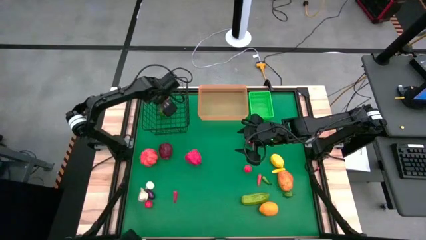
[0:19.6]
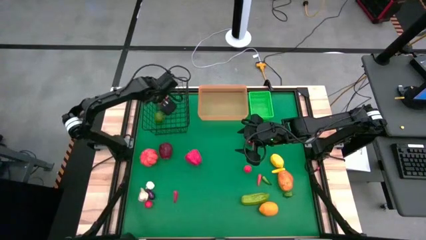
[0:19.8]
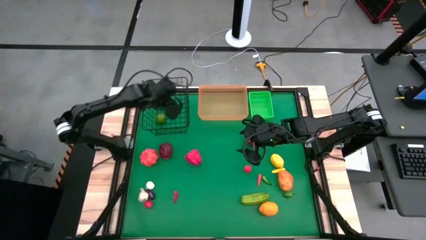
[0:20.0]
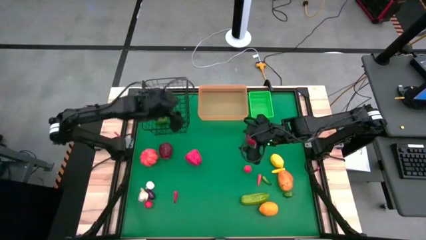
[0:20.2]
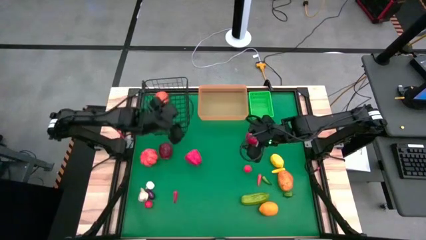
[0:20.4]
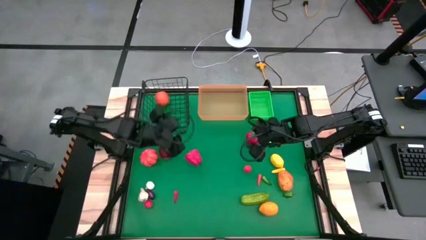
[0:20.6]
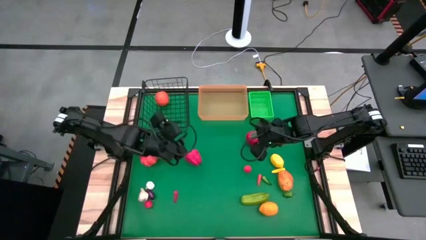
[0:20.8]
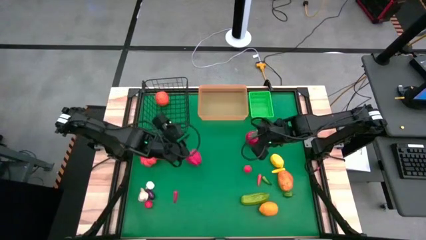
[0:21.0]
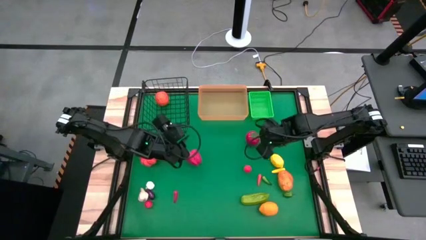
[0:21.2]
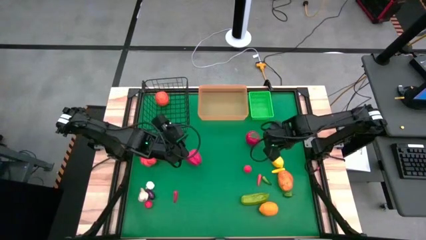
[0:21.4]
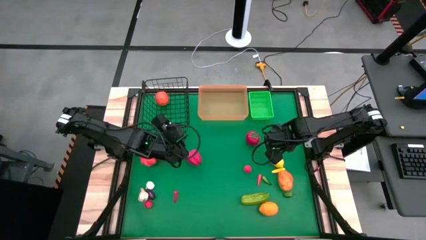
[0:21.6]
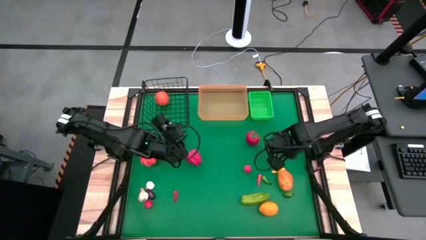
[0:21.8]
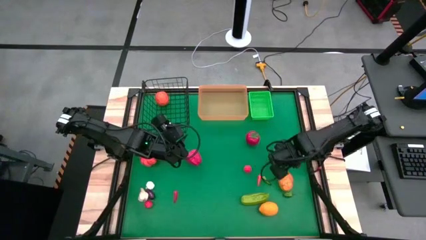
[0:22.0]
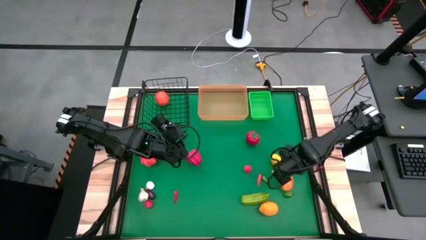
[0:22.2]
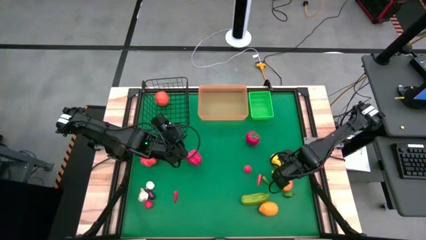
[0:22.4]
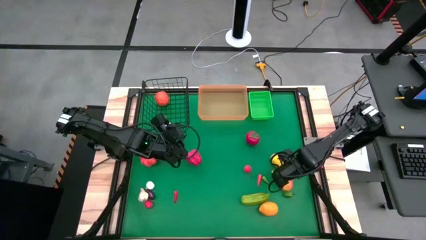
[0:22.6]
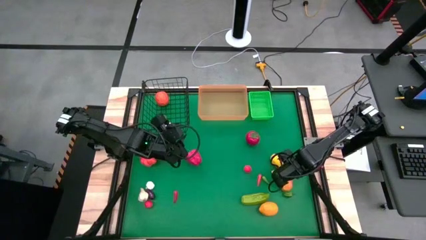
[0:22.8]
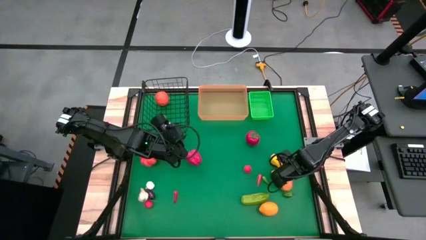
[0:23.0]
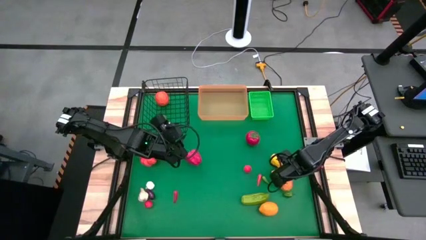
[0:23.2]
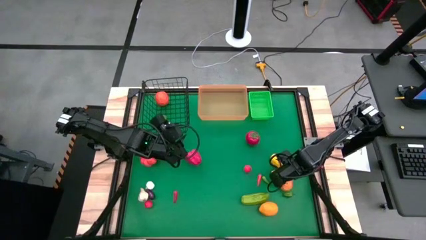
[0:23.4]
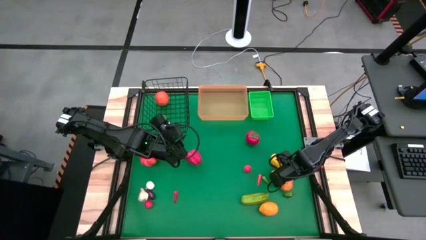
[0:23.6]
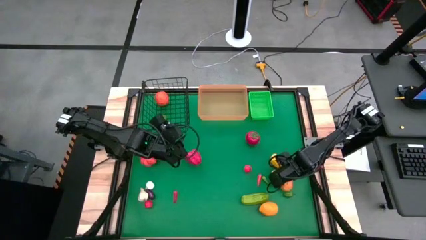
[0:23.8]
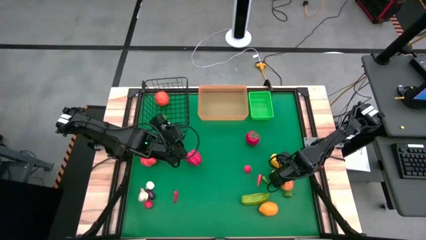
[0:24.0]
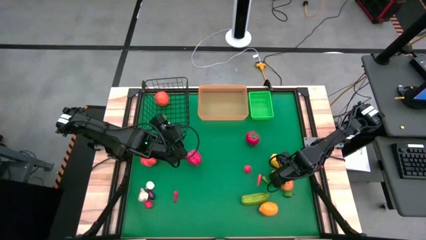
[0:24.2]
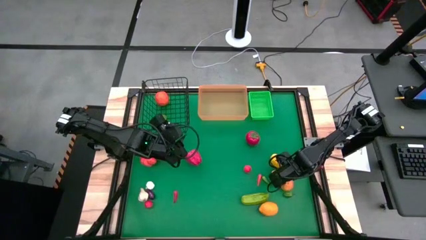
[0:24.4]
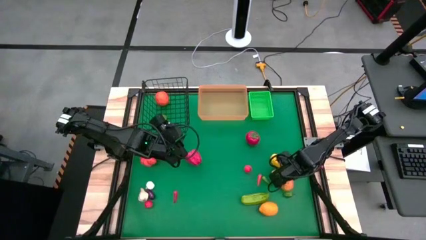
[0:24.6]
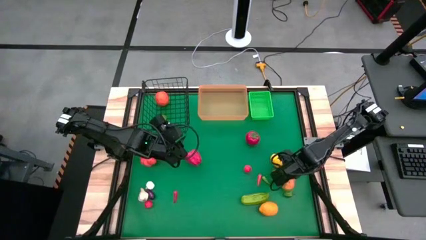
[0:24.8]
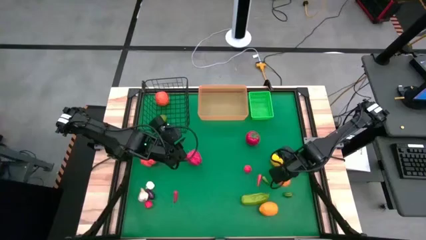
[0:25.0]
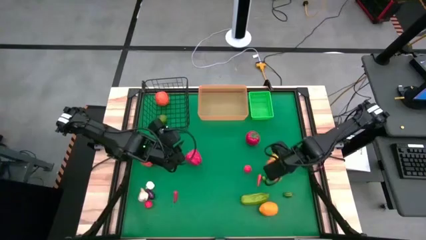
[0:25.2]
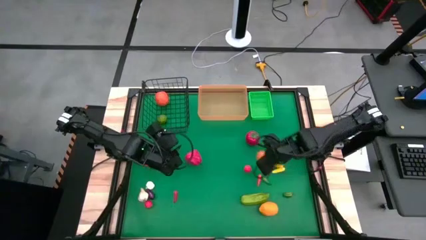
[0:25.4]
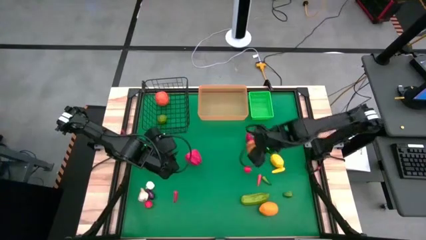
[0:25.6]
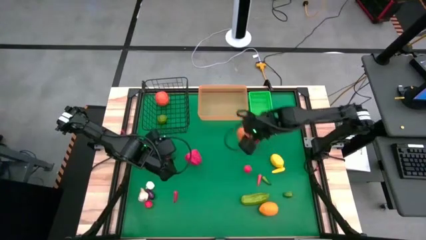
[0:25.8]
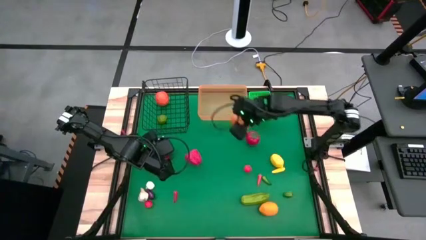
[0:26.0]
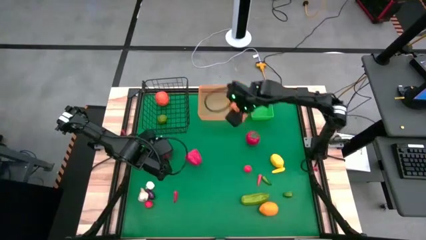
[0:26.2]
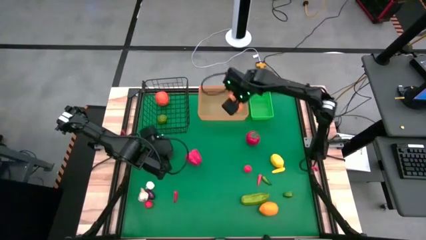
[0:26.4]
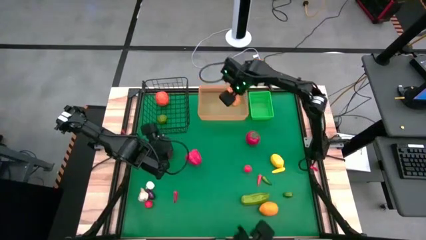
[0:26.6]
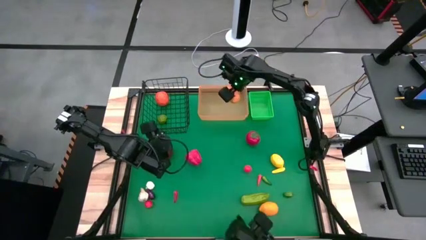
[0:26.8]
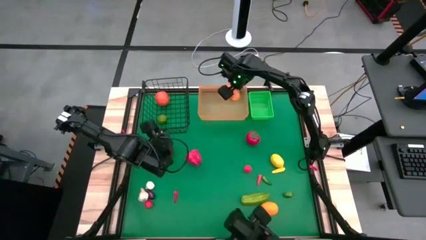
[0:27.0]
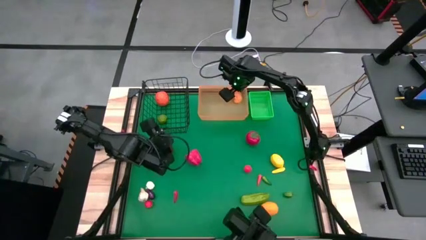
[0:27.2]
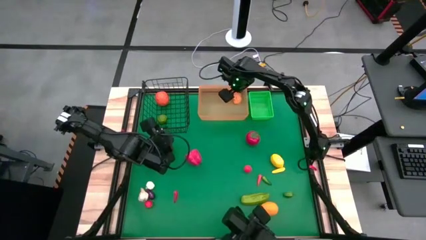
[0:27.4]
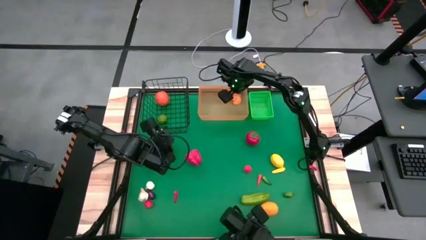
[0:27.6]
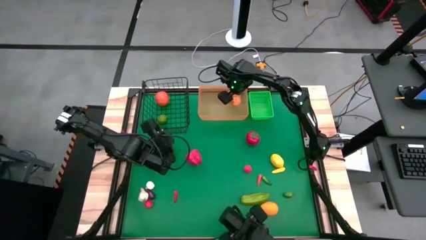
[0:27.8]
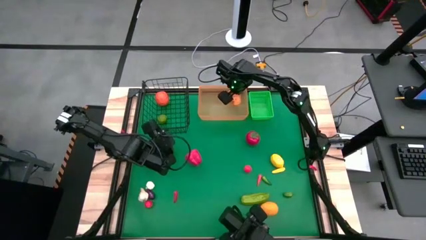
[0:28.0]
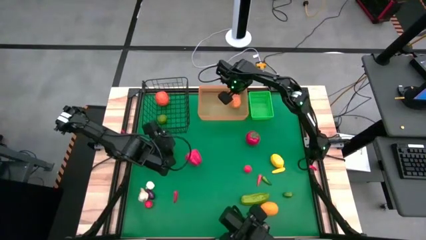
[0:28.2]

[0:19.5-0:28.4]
Task: Sort produce into baskets
Put the orange potato into the orange bin

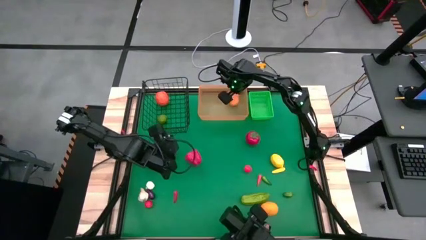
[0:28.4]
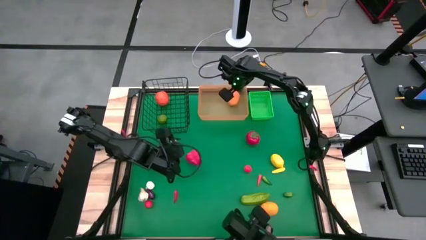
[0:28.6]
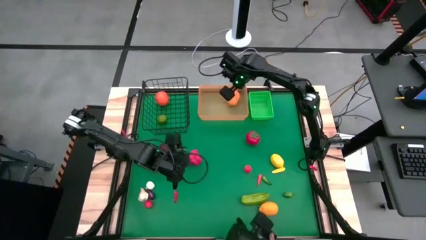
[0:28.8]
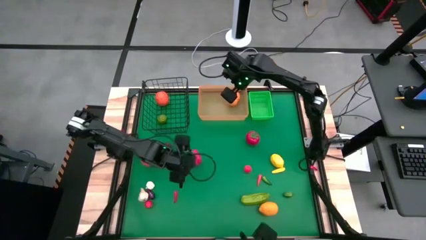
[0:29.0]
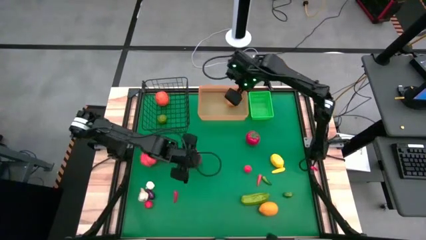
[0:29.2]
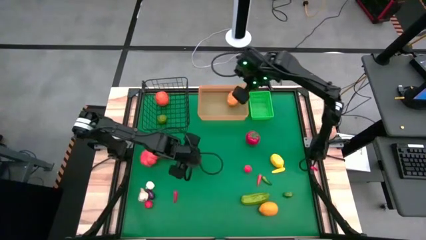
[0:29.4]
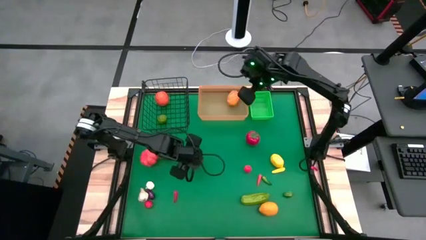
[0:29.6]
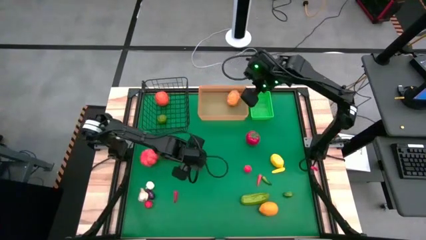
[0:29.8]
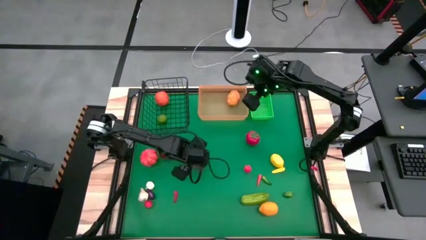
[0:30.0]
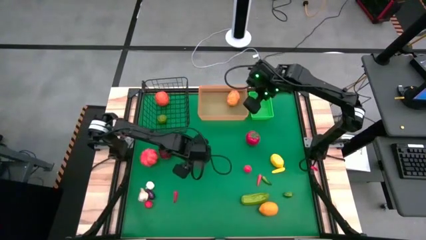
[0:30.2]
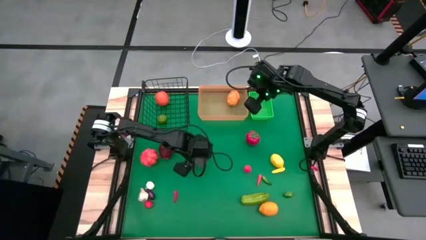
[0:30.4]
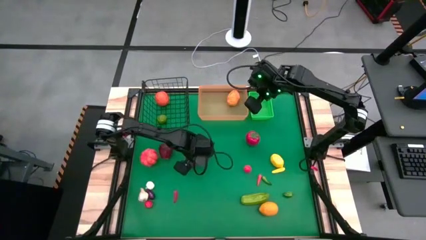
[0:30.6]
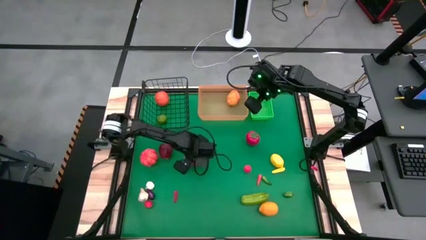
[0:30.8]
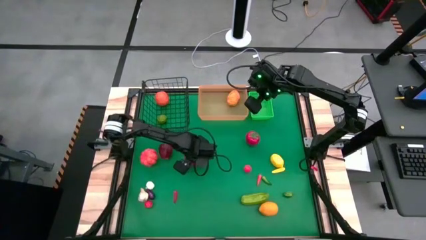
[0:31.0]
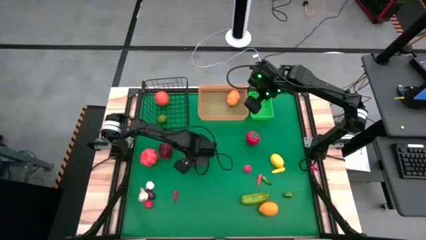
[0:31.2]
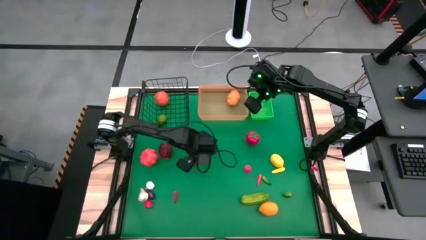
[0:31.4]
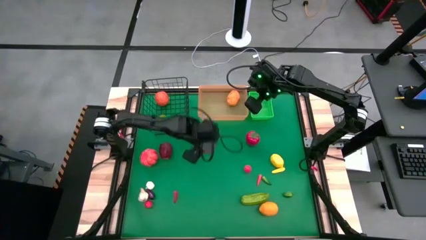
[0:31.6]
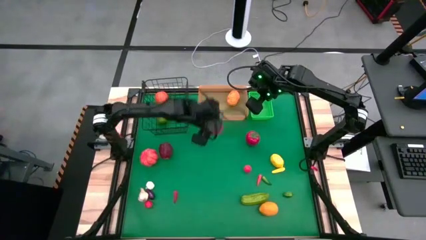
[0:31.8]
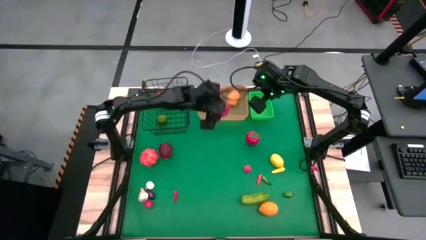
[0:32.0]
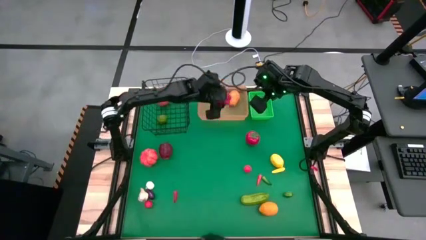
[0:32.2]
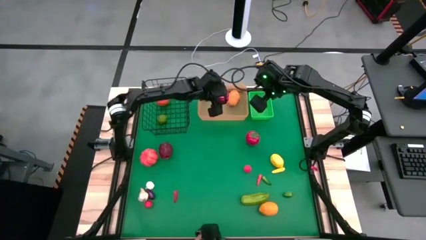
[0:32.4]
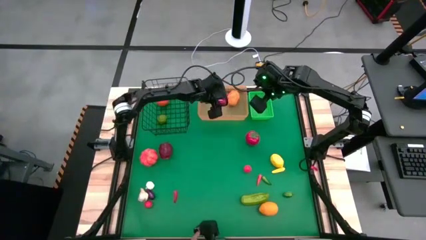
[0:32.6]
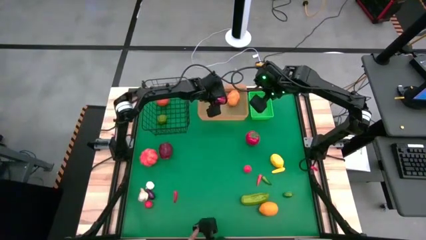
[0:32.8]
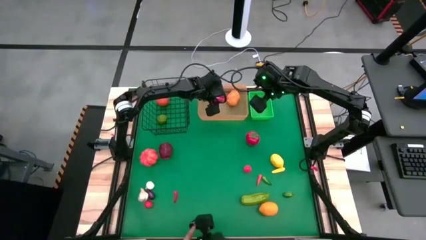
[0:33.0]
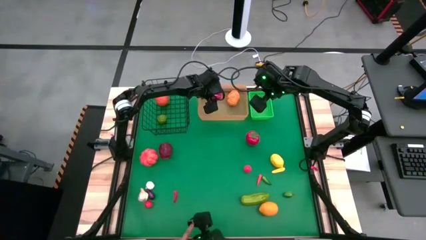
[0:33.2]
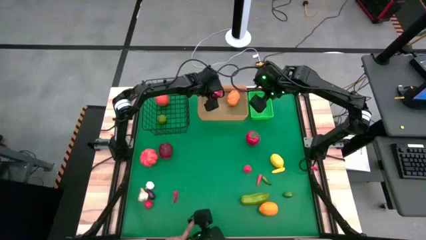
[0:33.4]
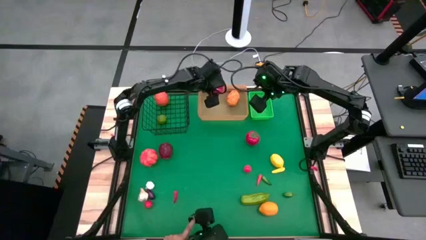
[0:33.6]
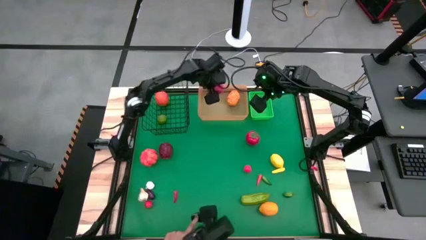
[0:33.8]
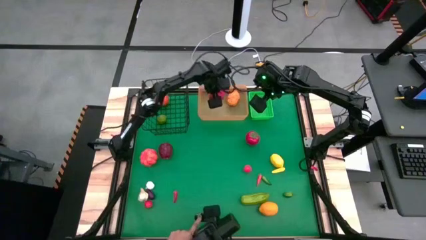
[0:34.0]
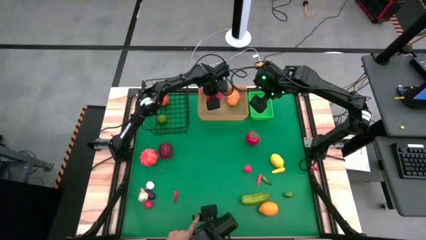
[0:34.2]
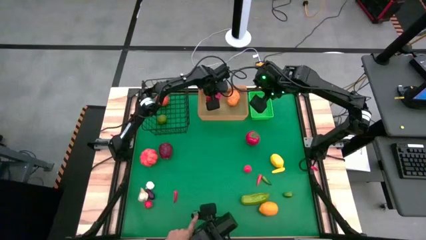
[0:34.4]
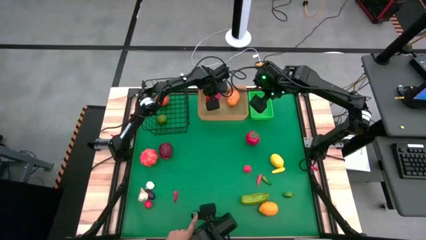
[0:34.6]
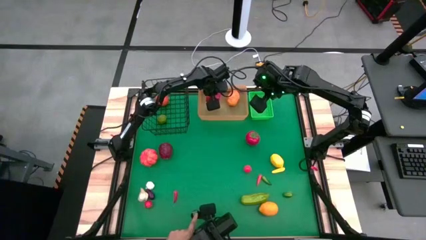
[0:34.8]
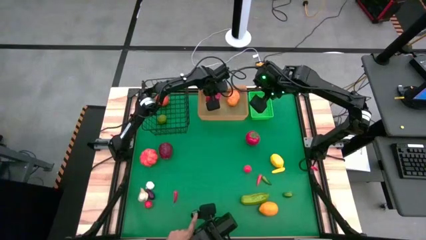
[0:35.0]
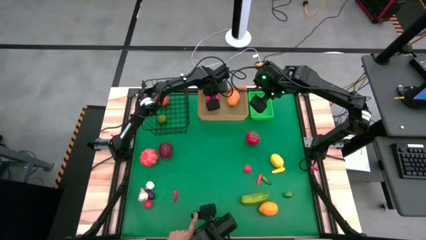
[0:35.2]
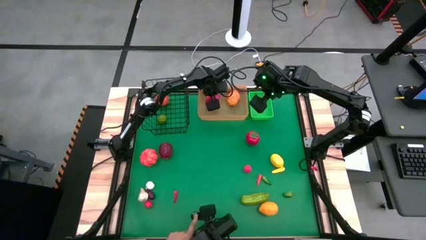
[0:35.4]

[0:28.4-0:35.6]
Put the red bell pepper into the orange bin
